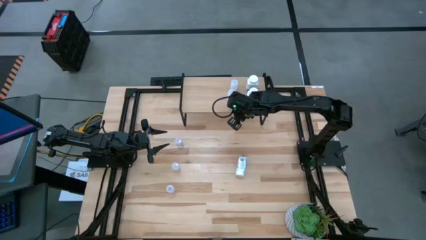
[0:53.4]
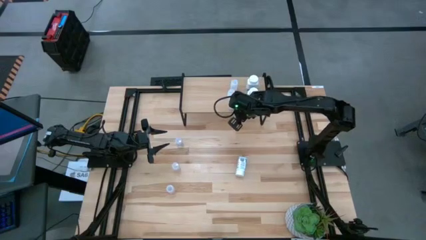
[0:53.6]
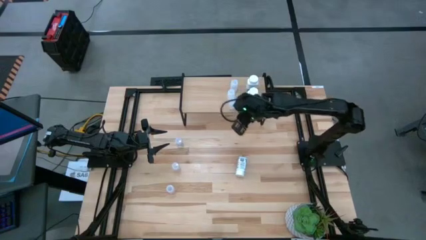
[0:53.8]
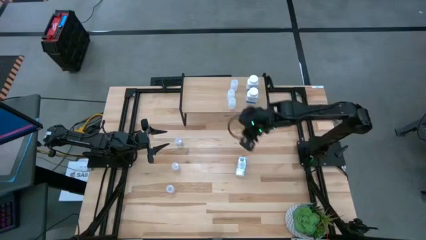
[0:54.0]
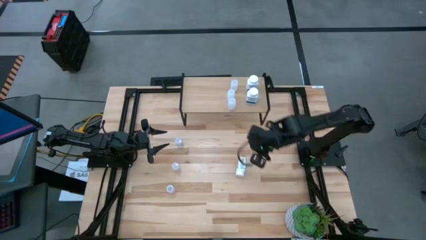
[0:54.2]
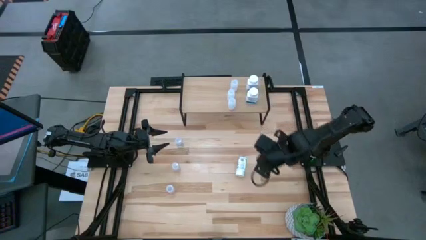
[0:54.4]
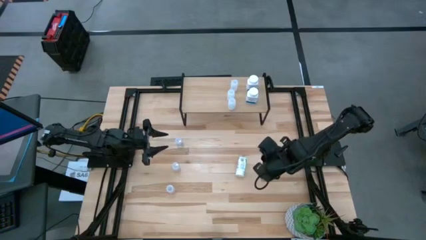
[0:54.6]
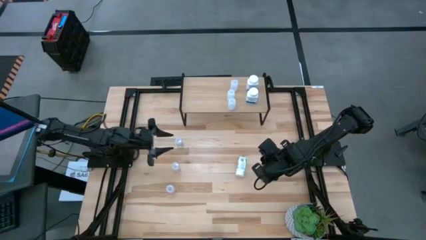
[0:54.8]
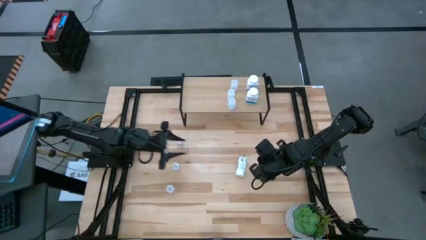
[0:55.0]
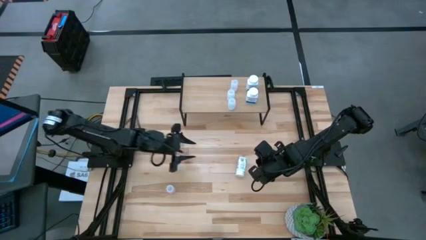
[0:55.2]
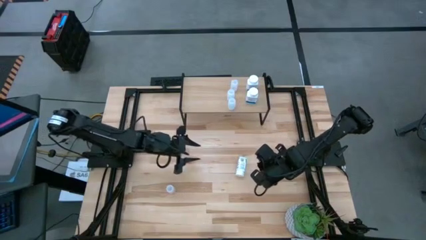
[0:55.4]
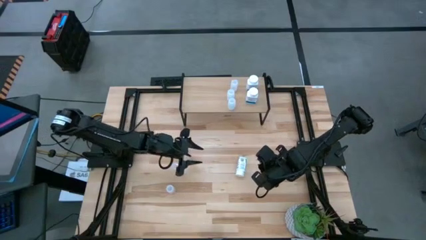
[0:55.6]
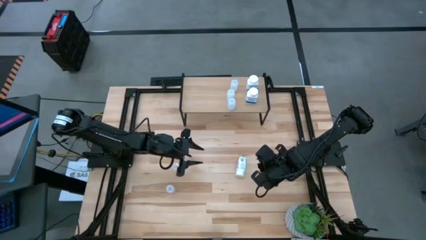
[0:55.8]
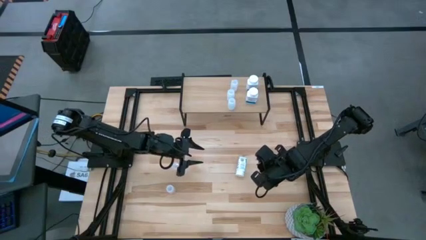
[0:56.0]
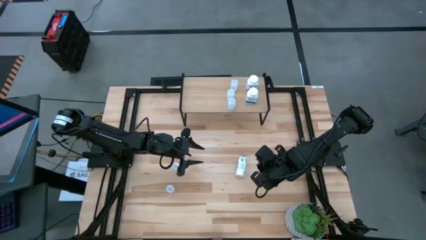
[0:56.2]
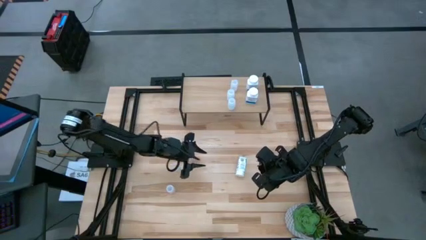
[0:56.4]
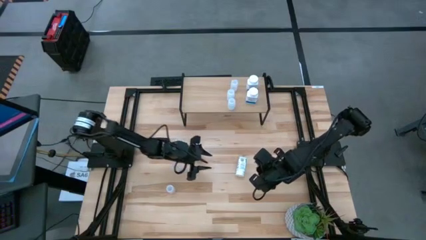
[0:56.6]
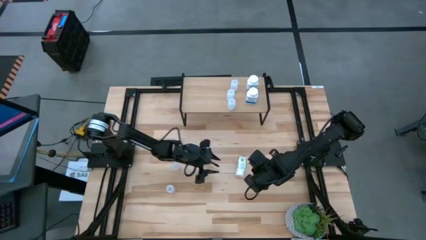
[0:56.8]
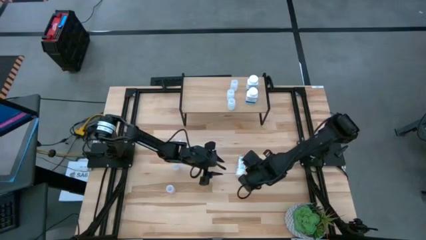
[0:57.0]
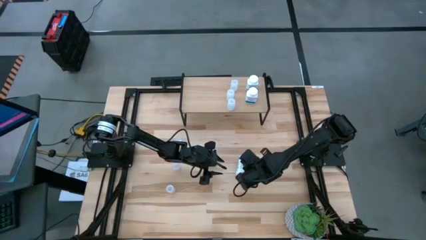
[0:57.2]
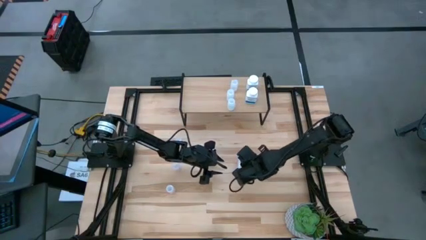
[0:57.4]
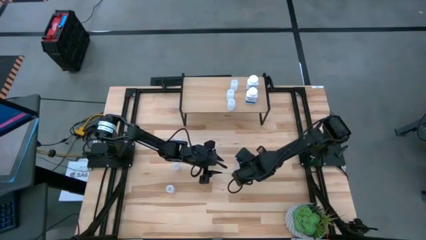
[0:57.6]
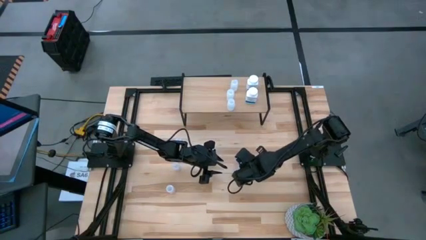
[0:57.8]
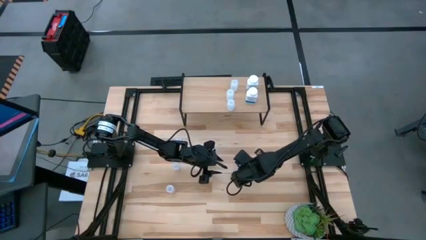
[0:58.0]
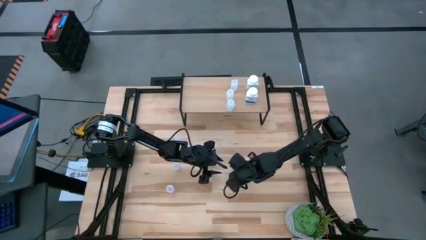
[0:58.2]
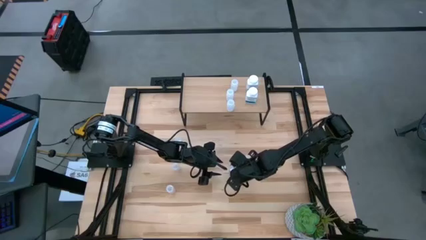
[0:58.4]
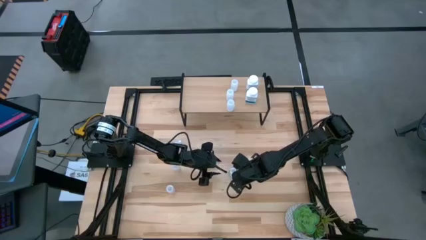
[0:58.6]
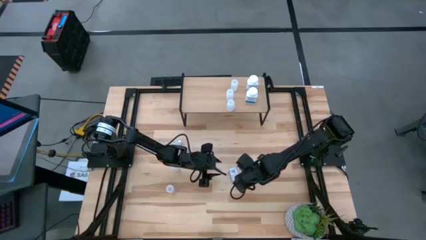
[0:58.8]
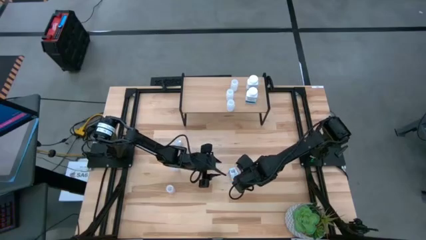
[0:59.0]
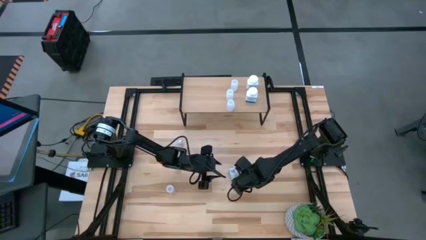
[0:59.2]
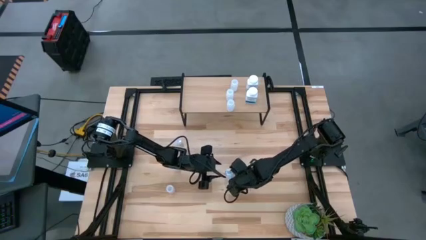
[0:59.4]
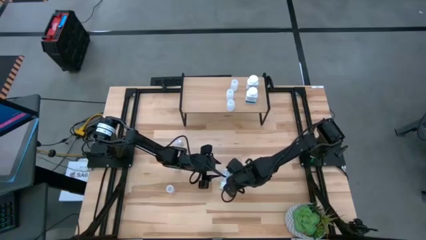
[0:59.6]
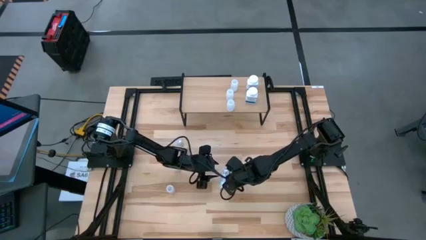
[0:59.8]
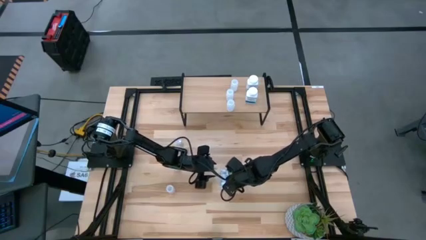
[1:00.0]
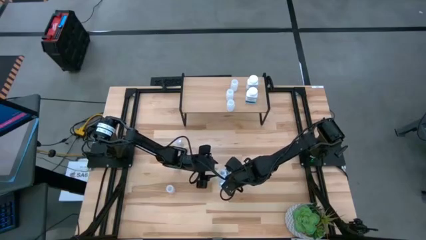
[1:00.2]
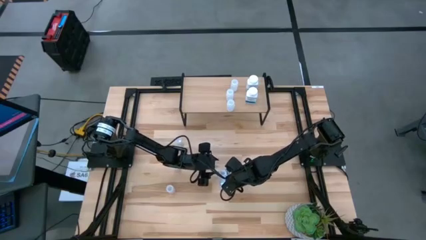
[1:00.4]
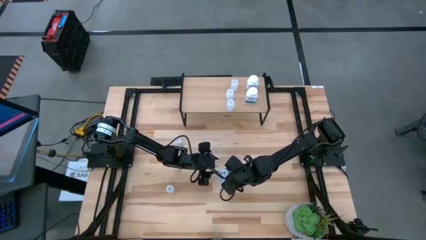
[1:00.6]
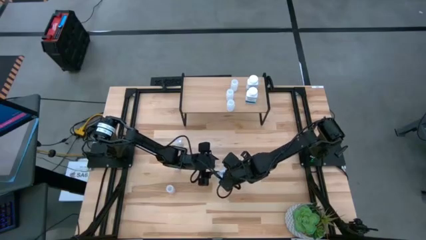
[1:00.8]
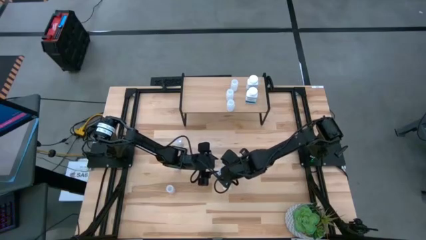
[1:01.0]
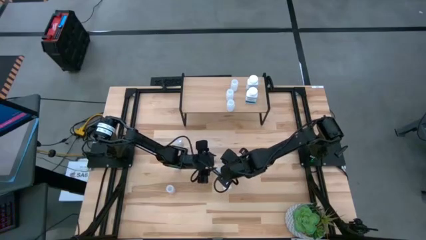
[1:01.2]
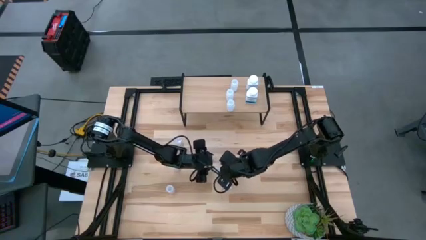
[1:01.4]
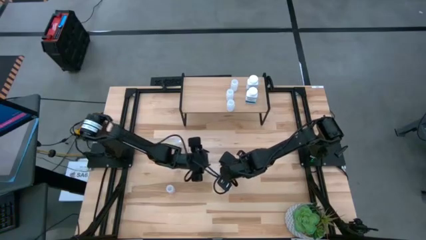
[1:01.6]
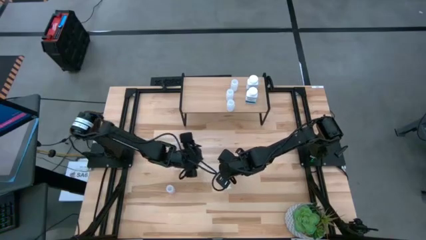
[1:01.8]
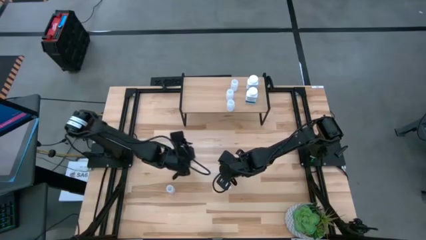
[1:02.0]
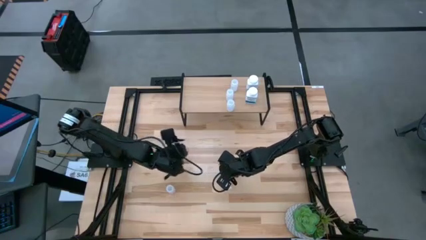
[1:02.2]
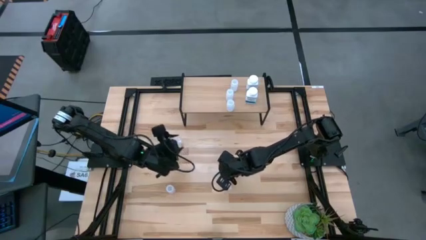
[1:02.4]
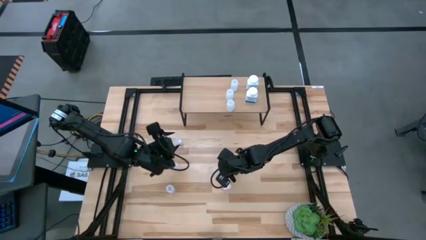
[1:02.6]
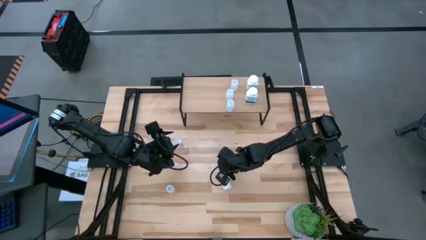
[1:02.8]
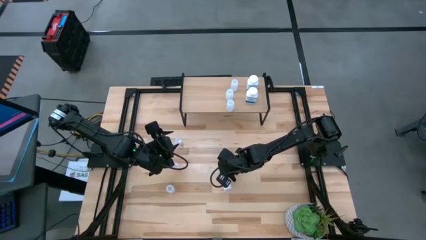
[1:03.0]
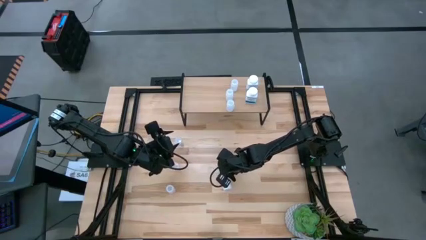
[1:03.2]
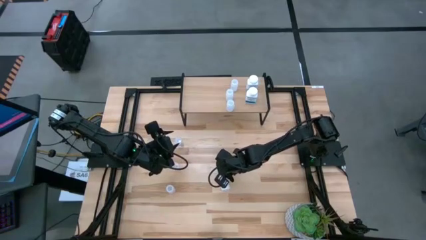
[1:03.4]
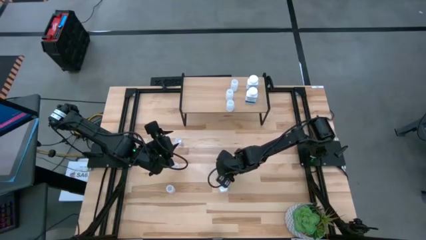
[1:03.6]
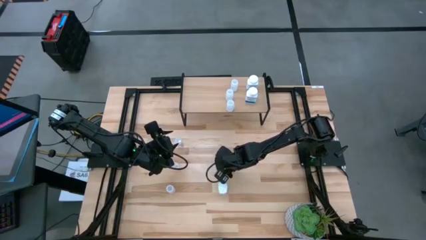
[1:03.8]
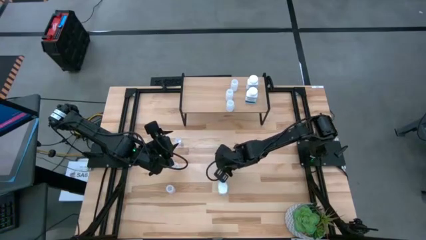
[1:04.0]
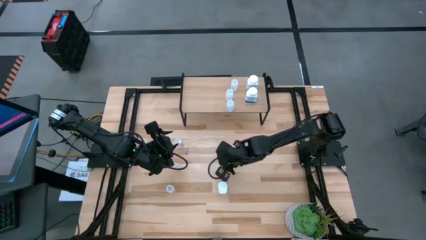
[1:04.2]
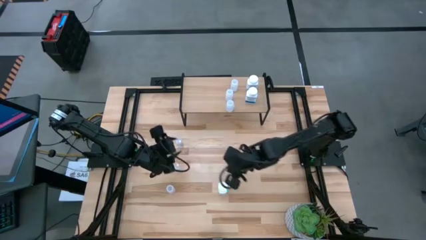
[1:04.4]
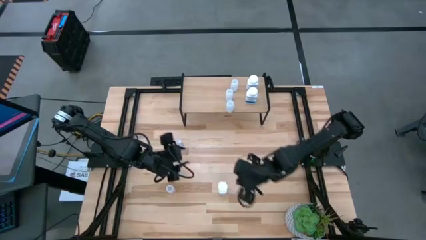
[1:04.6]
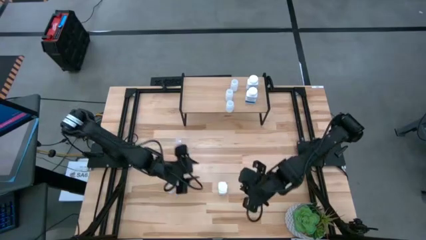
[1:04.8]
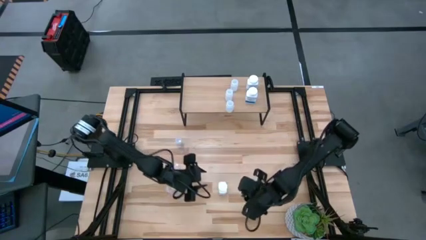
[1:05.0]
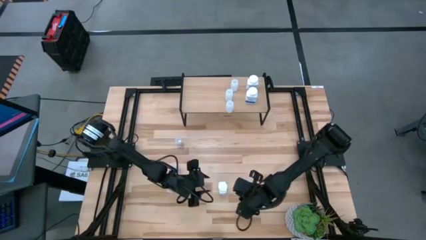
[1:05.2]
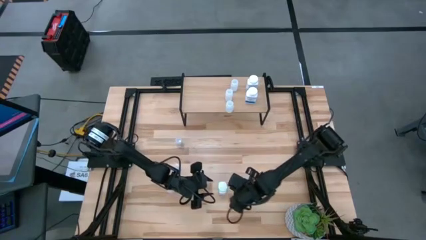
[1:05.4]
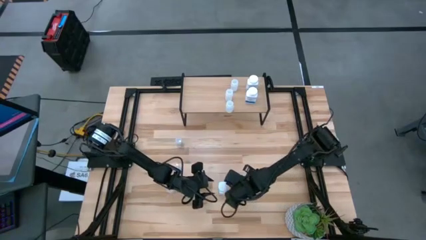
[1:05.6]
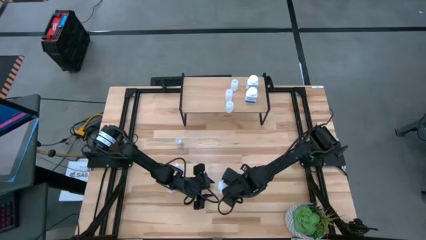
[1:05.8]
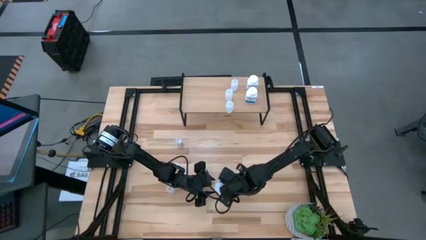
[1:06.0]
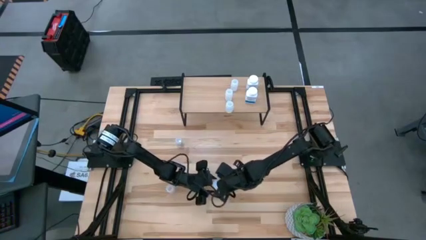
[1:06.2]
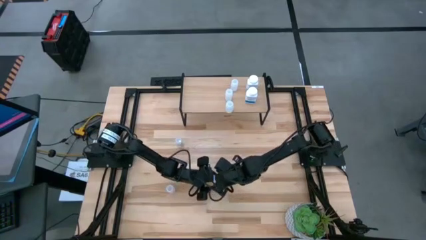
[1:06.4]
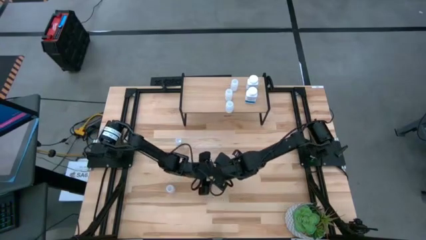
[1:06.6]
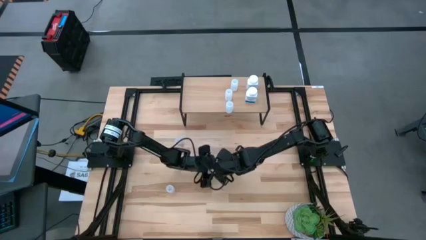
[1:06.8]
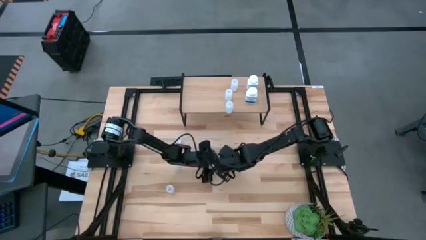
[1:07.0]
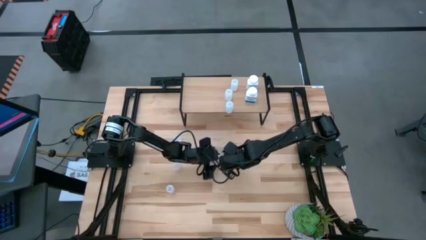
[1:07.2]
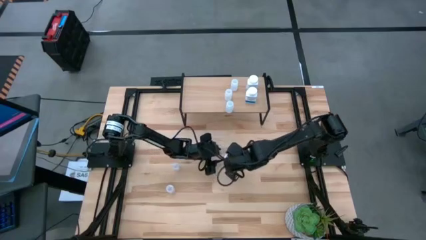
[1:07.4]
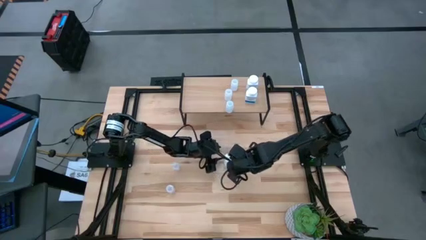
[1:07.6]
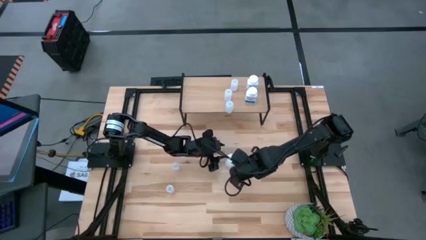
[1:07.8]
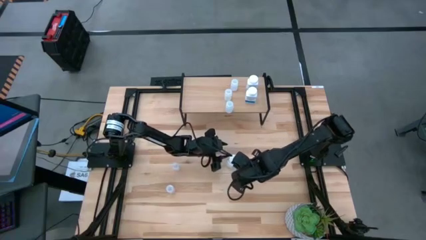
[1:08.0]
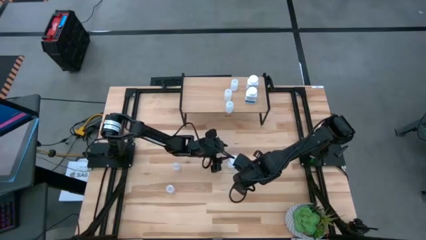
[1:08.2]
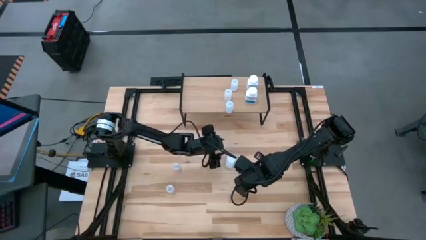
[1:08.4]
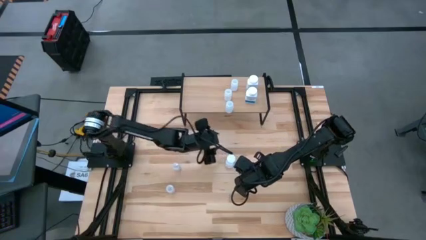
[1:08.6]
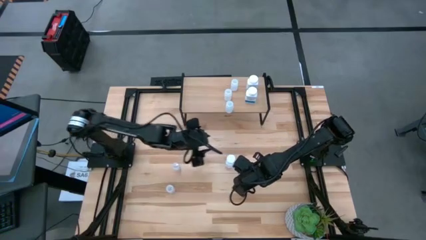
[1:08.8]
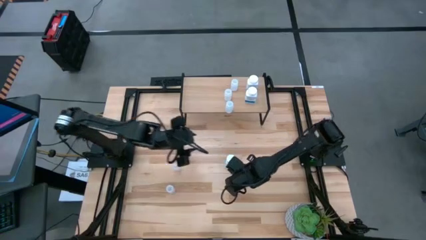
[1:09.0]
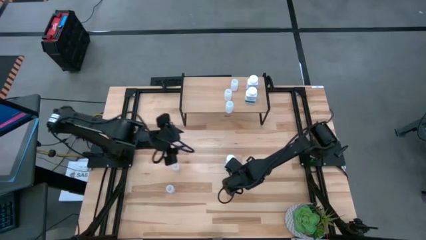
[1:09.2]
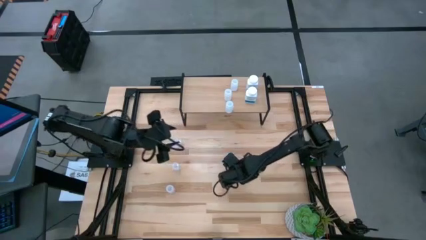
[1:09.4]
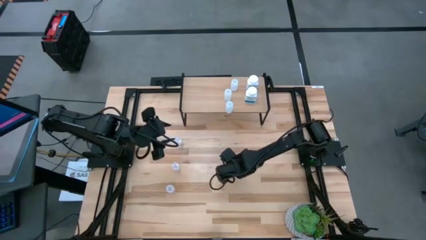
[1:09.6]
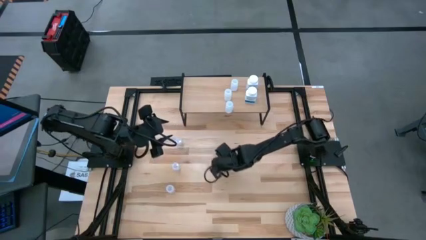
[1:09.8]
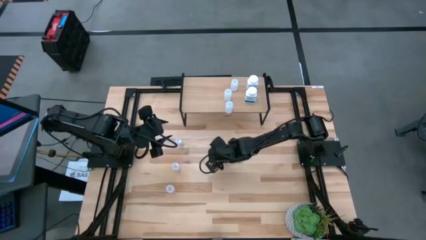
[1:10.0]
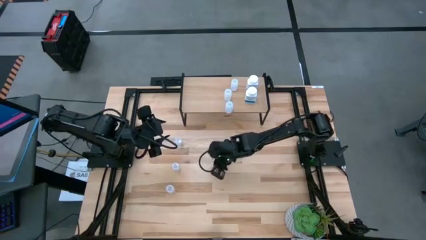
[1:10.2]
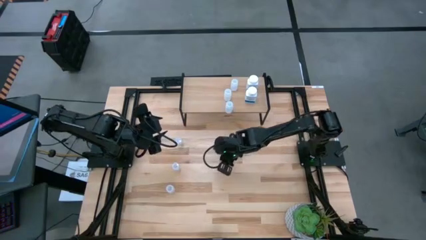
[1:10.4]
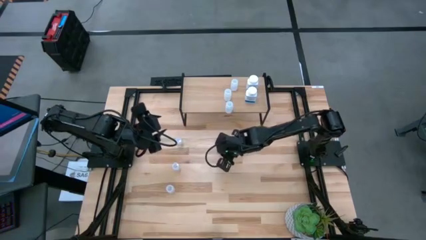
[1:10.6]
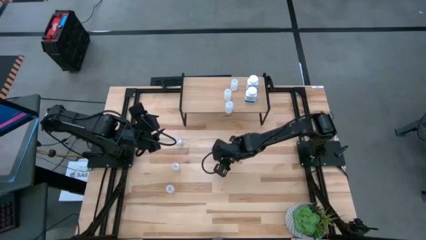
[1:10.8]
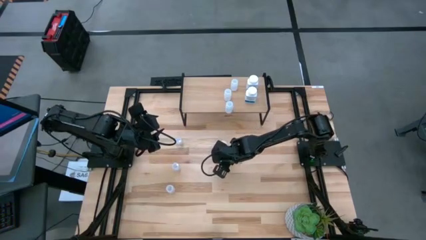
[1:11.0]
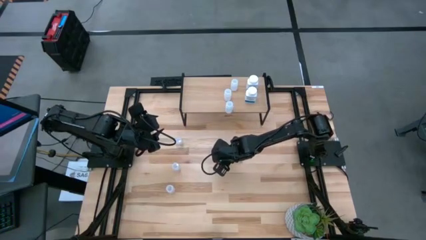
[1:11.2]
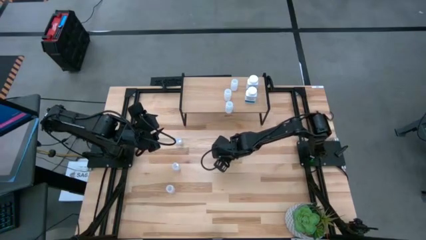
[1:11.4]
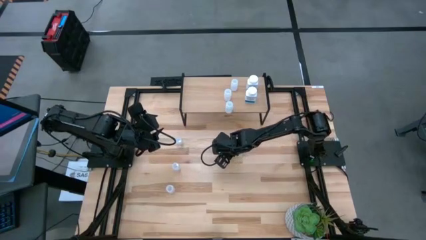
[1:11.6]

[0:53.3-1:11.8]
Task: Pick and place medicine bottles onto shelf by color
Move the white pill bottle to the center of the table
